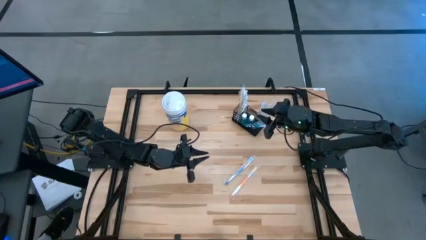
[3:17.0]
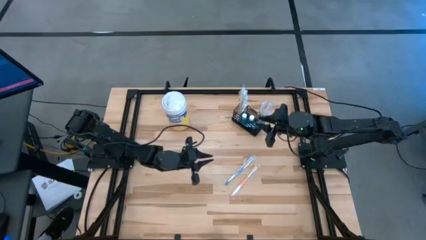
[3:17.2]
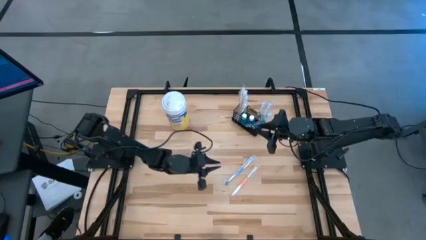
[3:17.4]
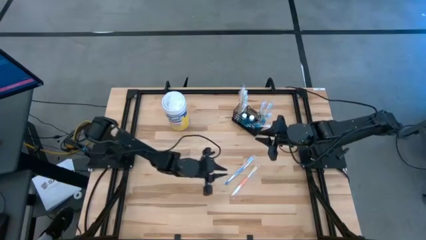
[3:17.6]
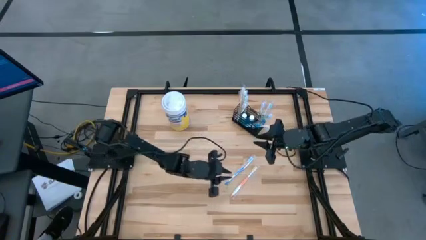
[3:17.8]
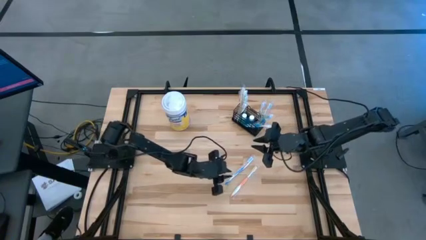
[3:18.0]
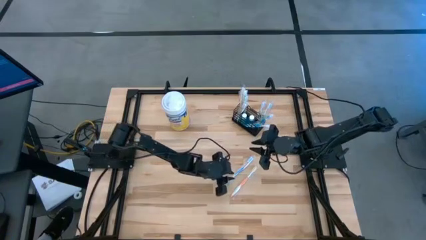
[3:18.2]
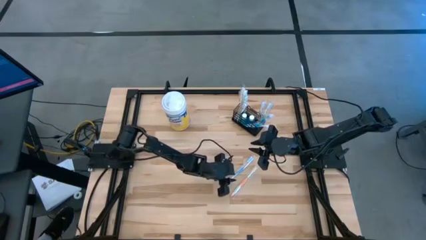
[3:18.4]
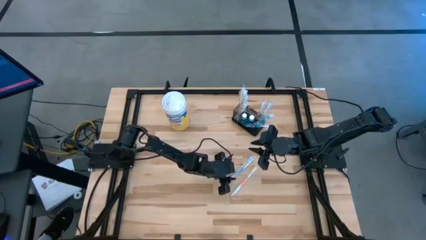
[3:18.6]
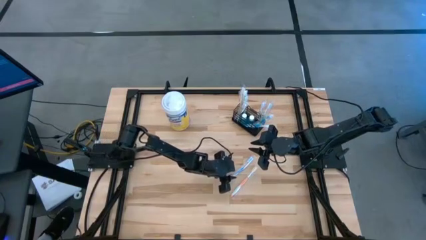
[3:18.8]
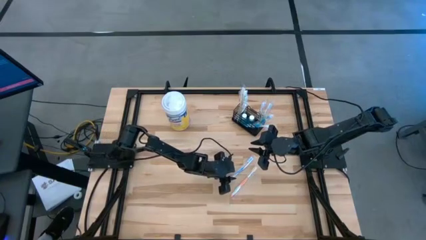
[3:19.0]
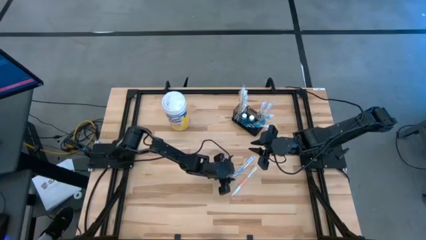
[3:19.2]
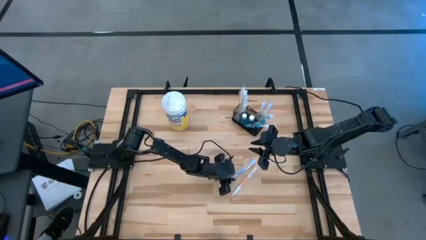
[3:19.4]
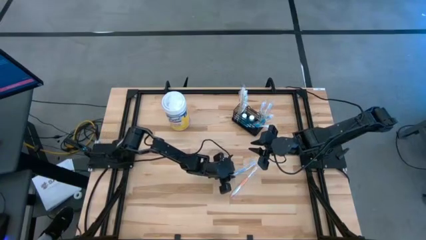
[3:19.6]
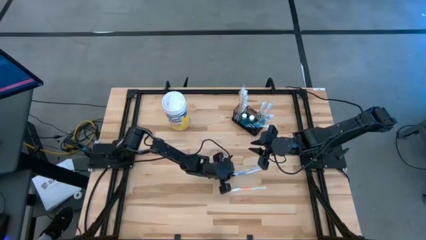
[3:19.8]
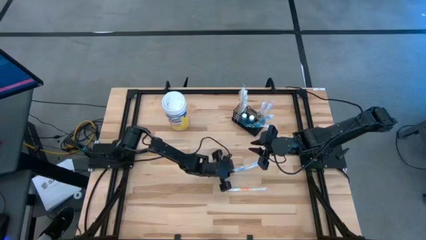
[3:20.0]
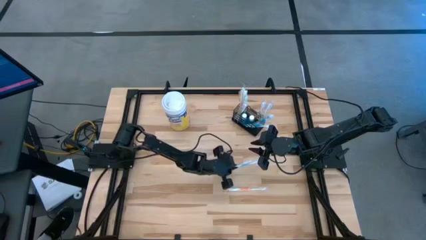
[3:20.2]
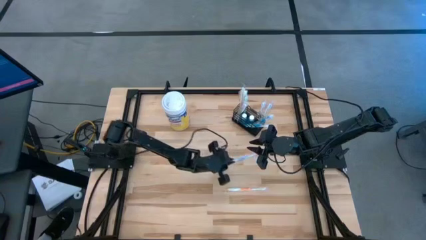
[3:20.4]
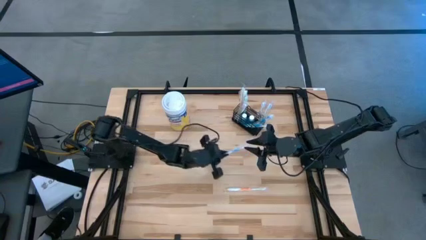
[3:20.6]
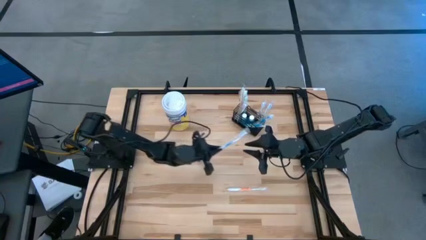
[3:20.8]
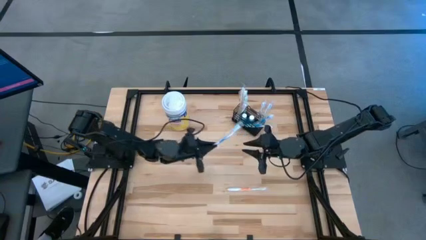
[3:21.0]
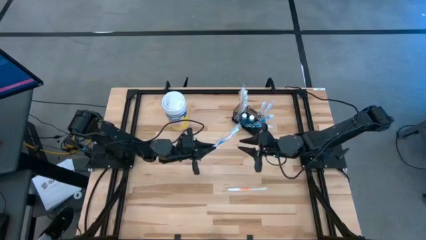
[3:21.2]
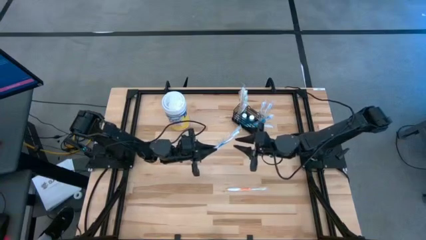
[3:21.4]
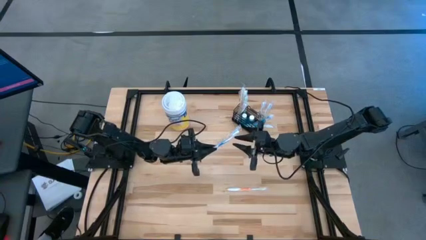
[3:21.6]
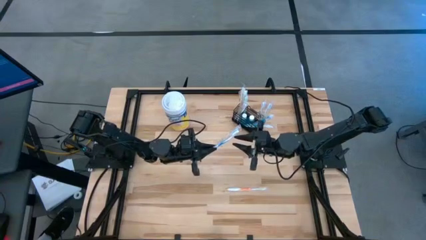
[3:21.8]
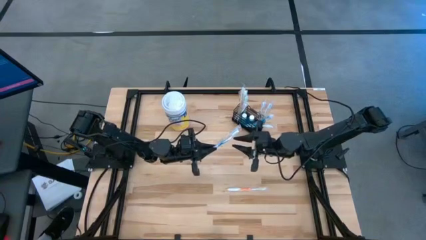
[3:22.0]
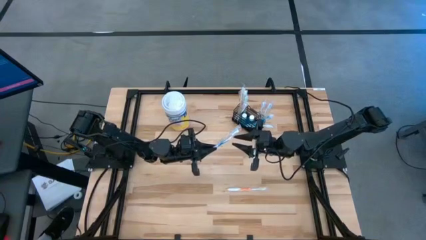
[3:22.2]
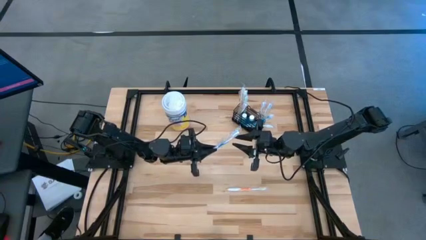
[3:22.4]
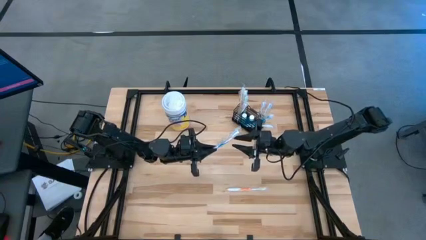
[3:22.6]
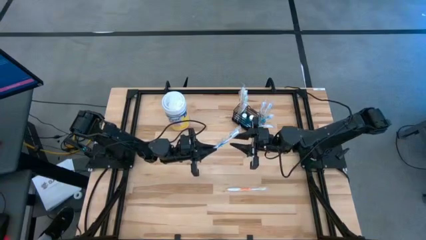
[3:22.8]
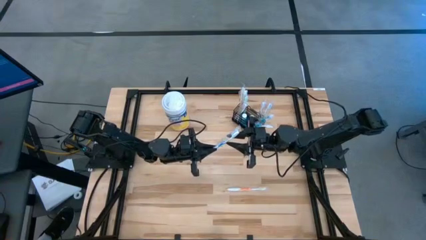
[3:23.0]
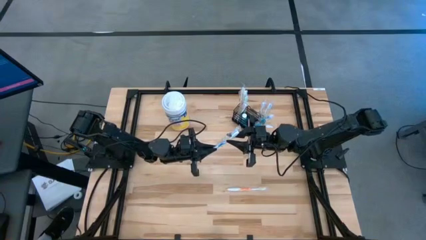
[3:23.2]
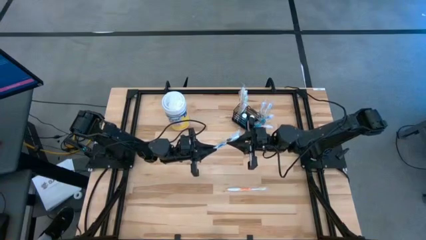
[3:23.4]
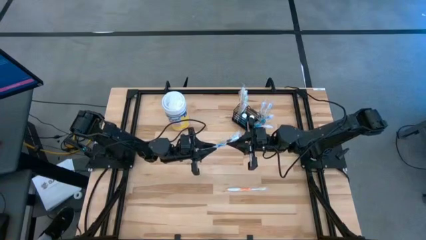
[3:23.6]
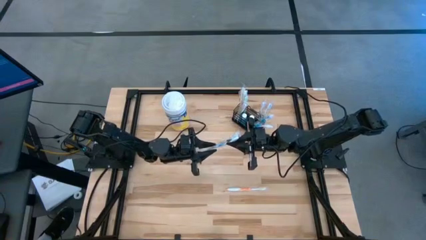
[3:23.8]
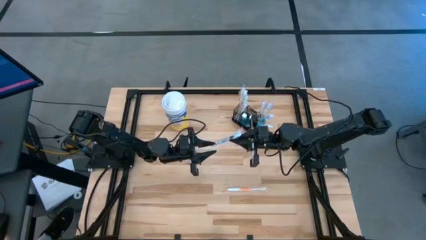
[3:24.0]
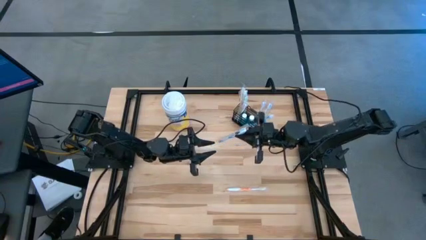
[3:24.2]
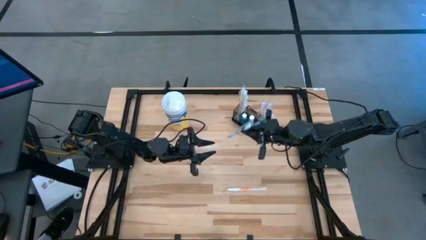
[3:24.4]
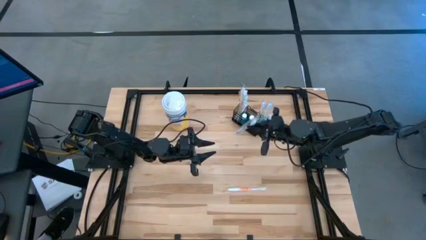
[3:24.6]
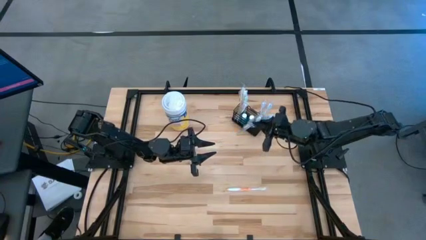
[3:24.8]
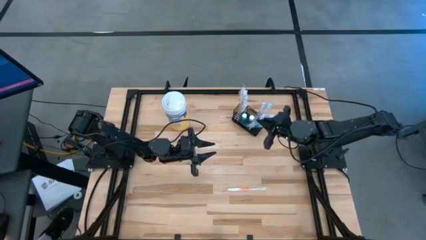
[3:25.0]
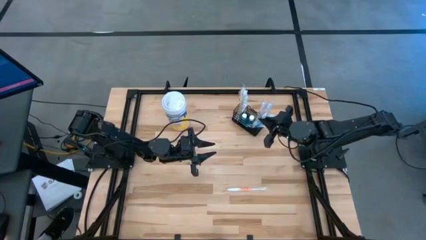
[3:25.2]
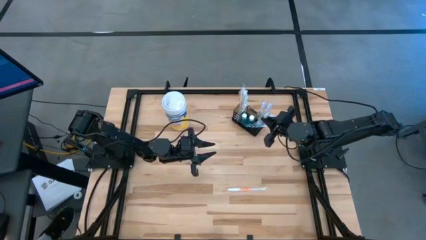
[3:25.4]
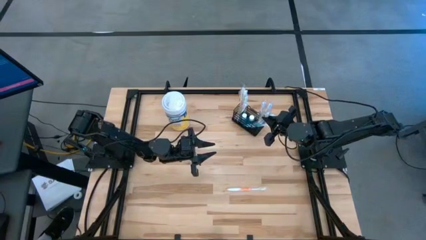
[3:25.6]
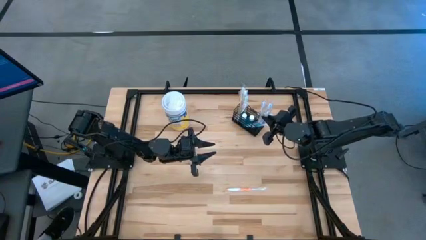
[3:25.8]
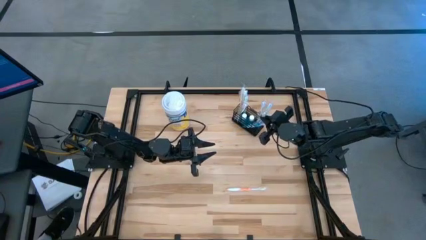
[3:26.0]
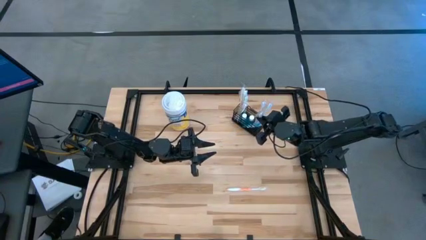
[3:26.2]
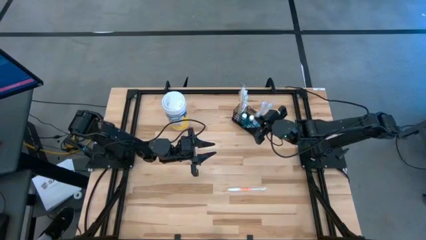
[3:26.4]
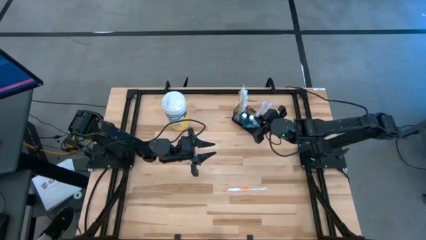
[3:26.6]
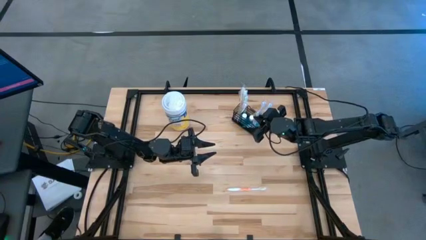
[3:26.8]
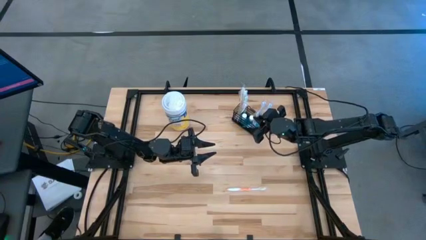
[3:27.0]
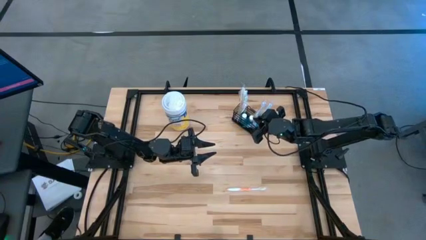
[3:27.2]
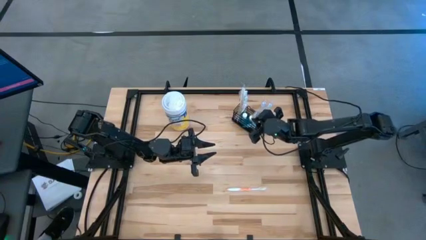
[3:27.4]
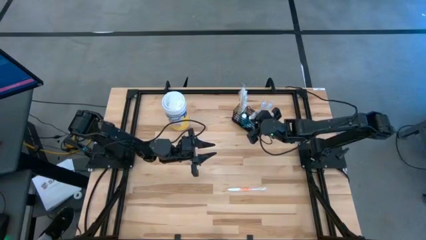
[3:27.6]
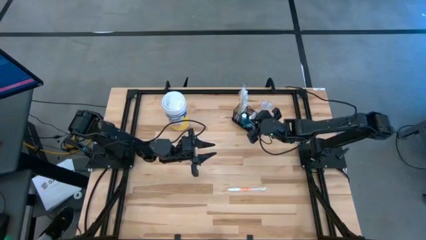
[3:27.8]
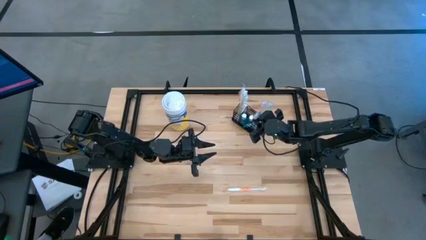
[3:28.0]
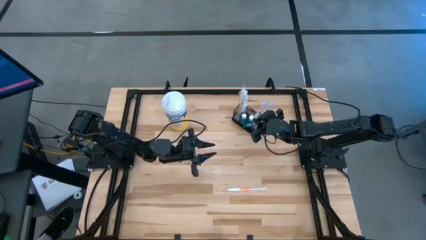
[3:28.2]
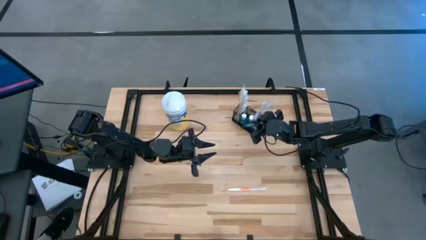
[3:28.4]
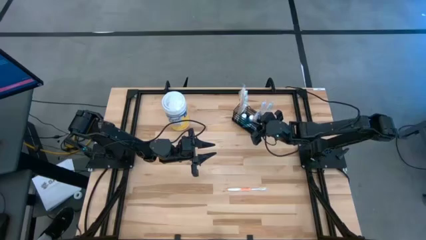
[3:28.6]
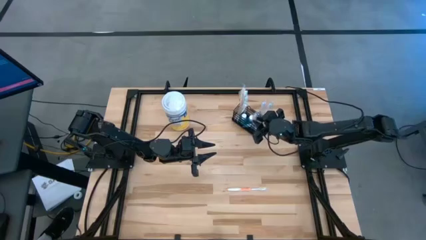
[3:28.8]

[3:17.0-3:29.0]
Task: Pick & Place toothbrushing station
Put the blue toothbrush into the black wire organizer

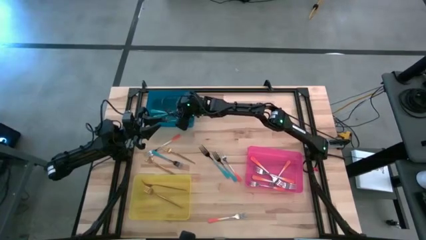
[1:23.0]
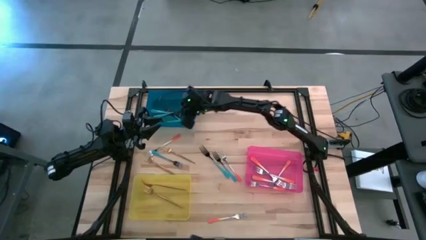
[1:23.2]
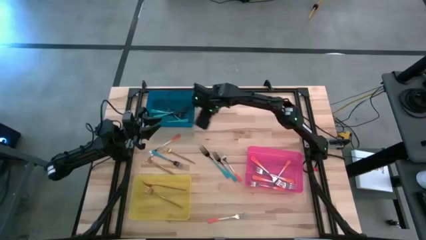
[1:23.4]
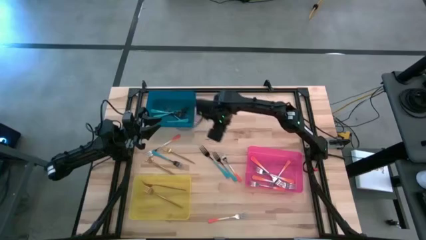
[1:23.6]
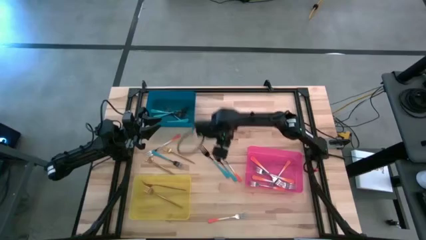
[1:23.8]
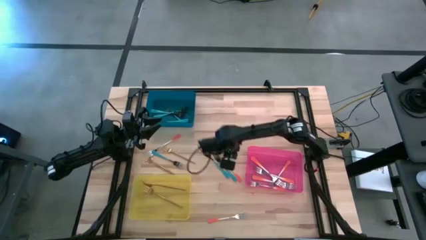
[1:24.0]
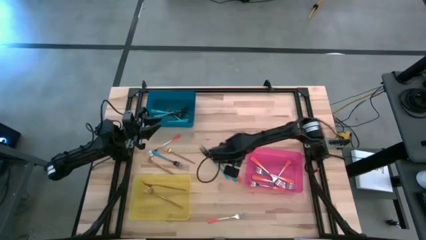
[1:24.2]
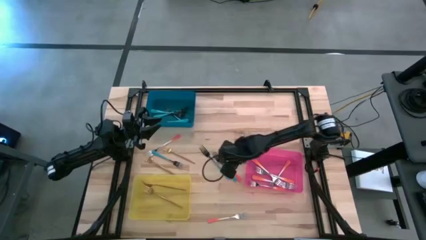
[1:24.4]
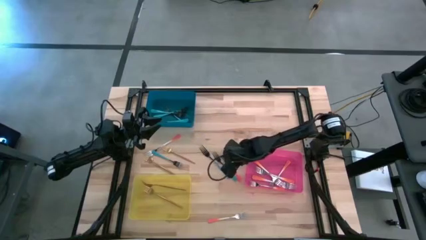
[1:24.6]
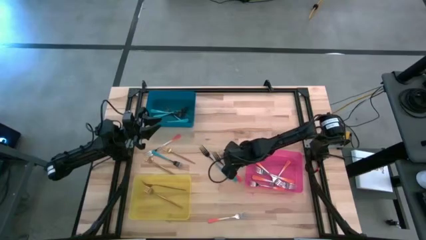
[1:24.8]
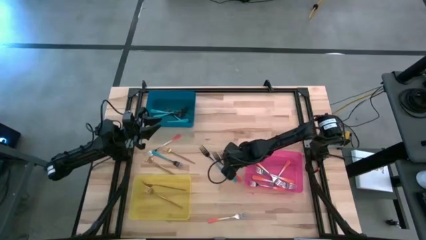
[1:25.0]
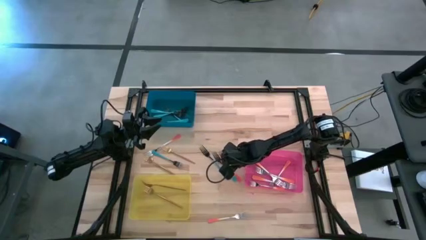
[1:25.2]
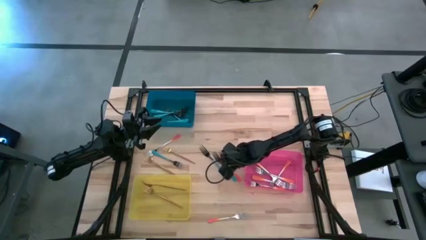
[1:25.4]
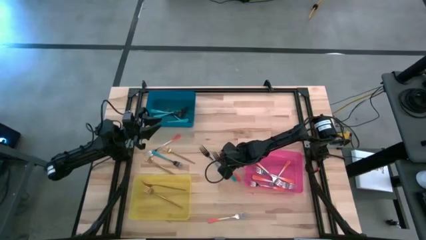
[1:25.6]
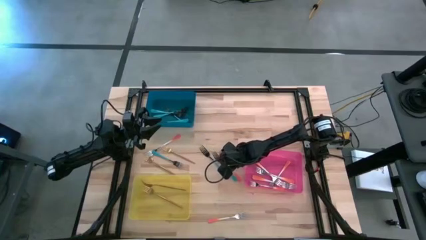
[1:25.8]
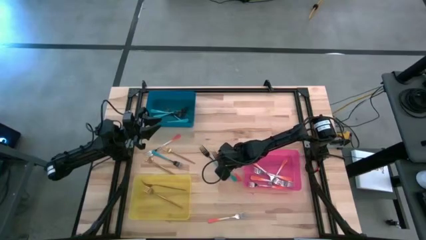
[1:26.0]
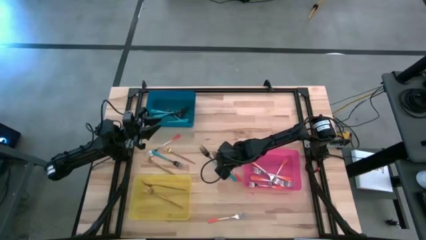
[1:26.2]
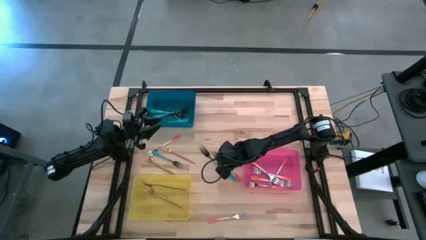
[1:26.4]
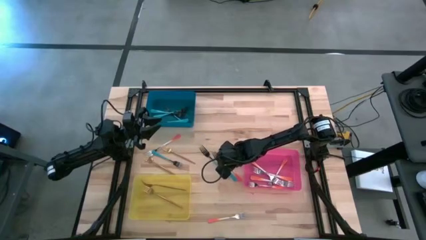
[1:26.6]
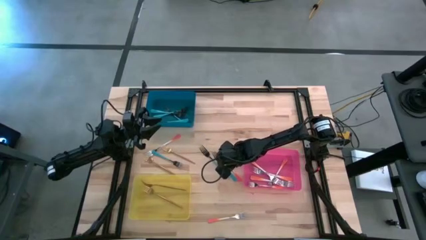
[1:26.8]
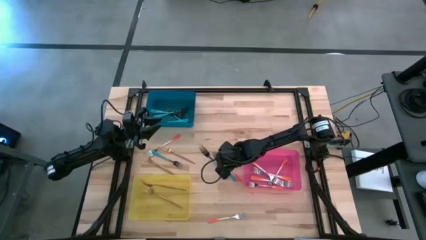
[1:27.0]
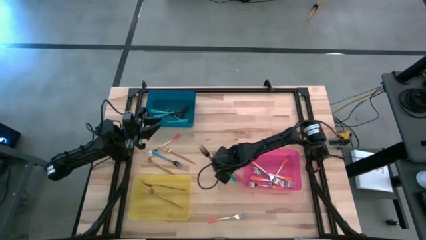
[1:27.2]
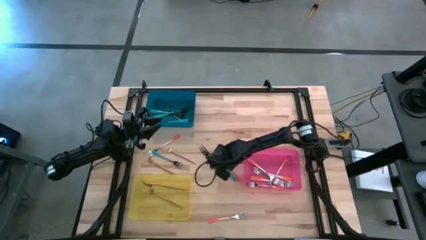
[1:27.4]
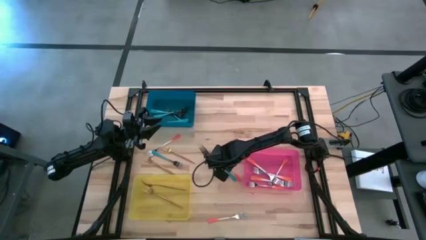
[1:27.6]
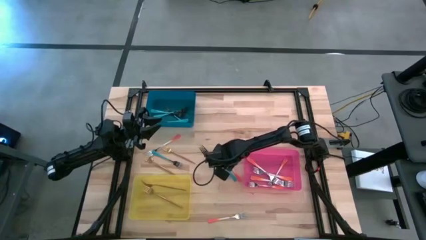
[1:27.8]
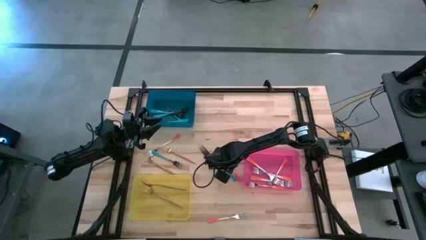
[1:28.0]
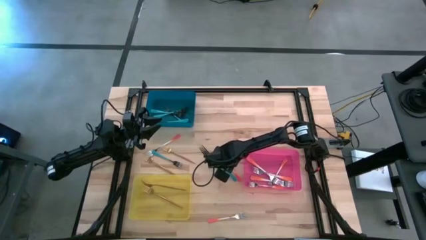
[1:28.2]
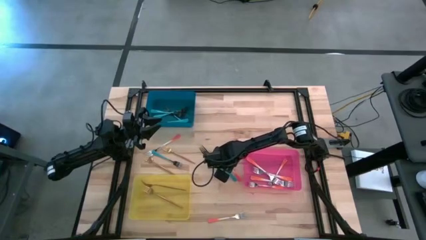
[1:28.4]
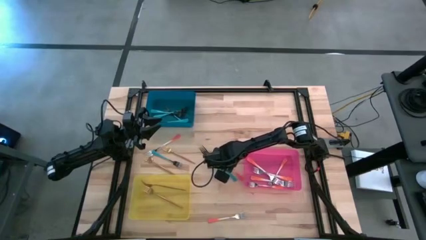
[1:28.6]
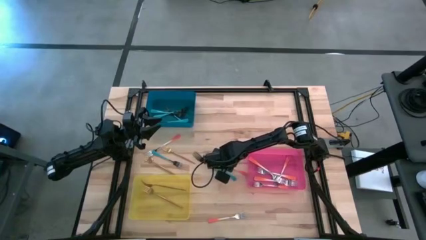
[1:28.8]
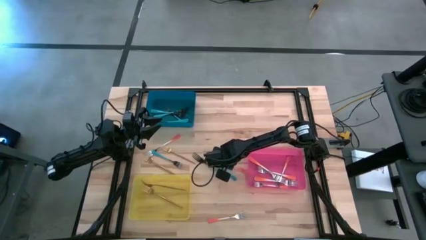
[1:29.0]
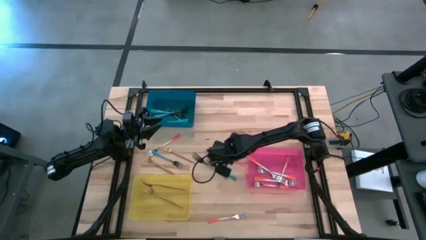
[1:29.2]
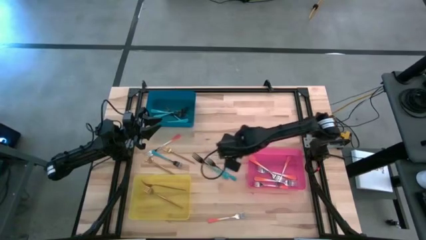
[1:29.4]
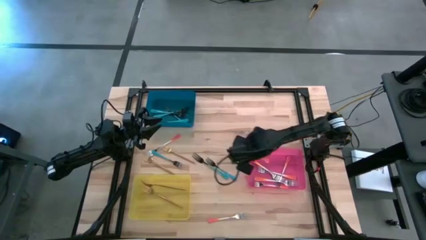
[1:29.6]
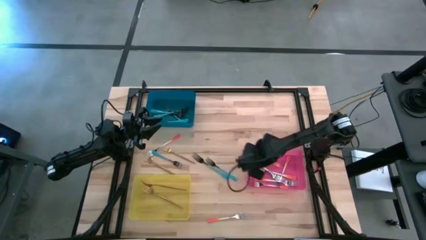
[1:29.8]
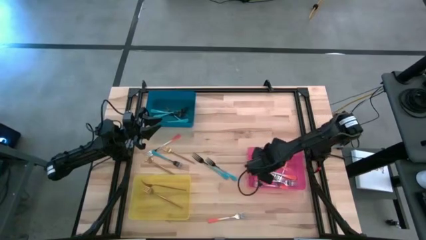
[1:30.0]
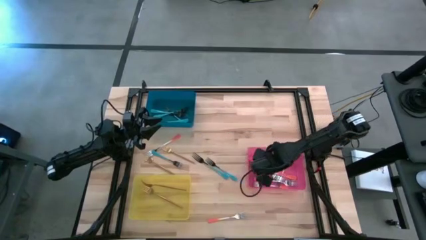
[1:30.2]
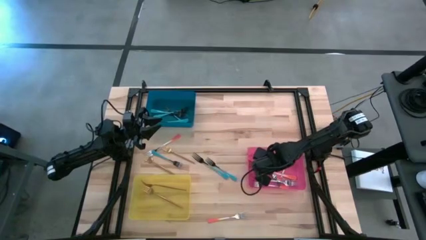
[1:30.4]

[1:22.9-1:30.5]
Task: Sort silverware by color (type)
Put the orange fork into the red bin
